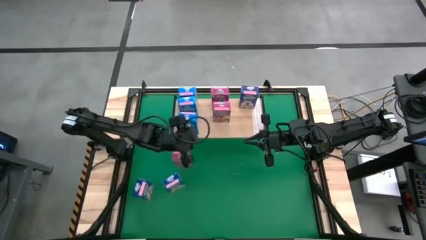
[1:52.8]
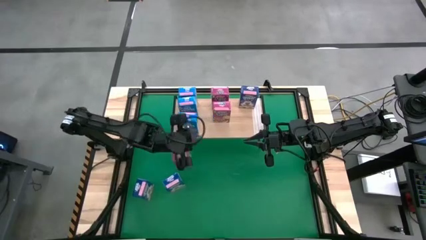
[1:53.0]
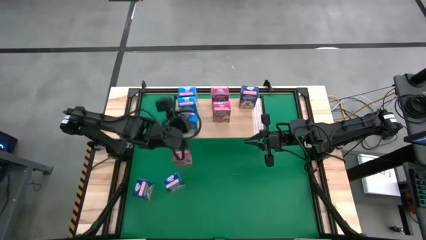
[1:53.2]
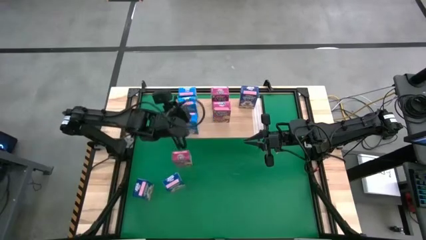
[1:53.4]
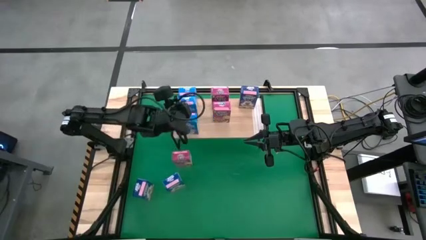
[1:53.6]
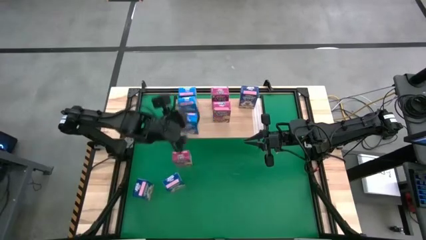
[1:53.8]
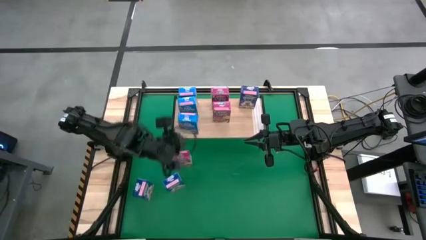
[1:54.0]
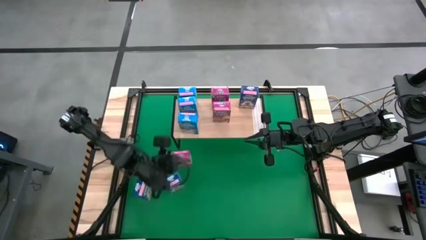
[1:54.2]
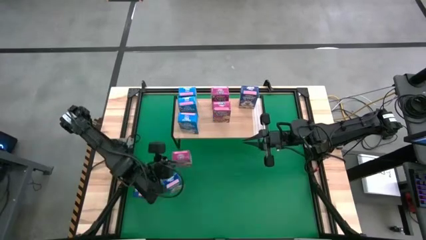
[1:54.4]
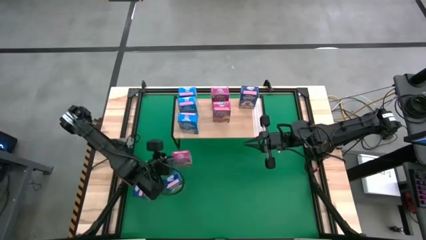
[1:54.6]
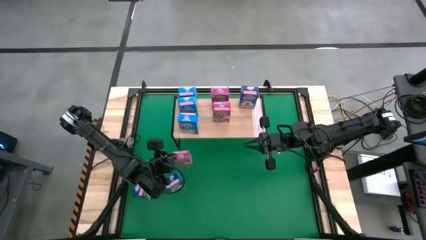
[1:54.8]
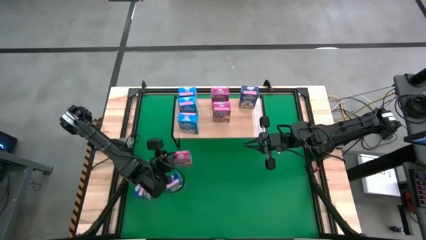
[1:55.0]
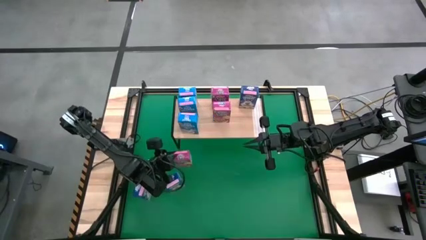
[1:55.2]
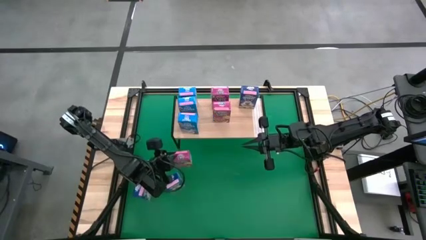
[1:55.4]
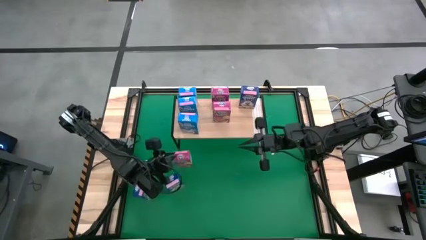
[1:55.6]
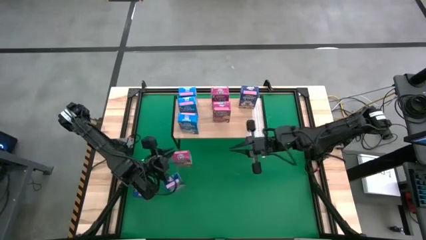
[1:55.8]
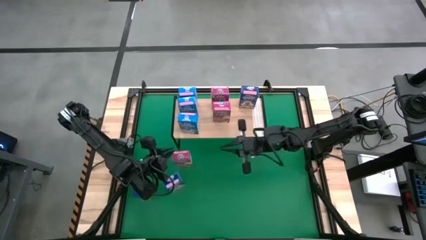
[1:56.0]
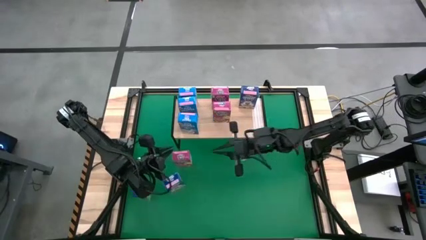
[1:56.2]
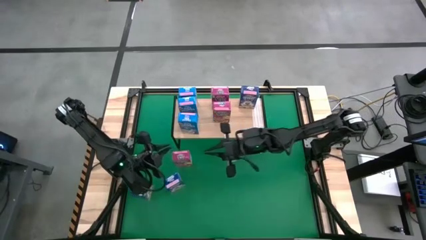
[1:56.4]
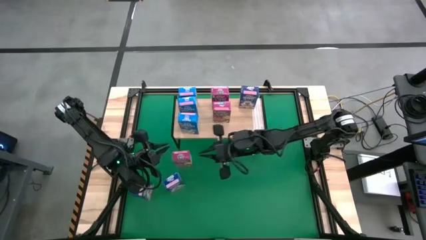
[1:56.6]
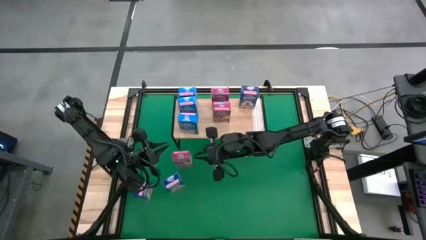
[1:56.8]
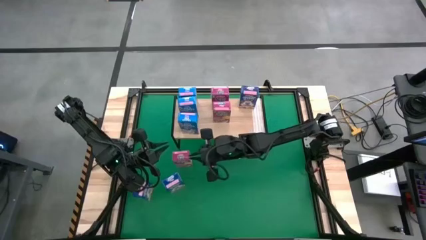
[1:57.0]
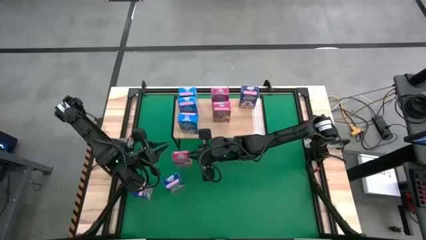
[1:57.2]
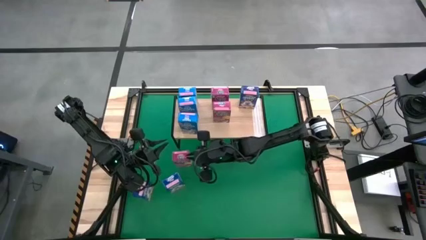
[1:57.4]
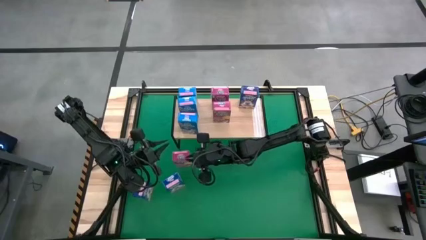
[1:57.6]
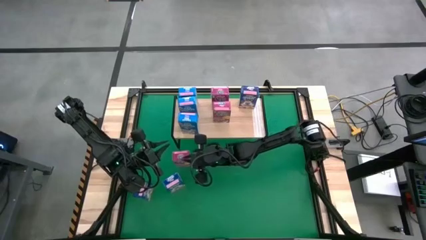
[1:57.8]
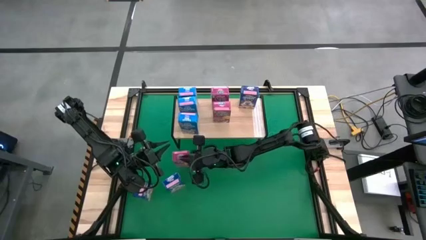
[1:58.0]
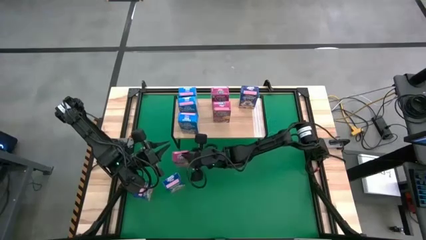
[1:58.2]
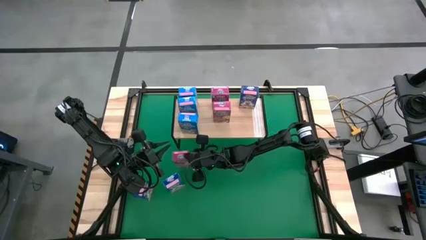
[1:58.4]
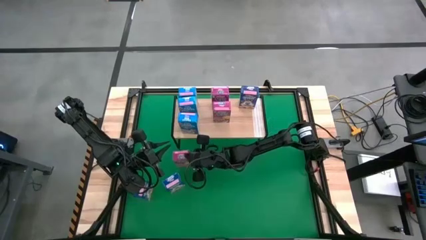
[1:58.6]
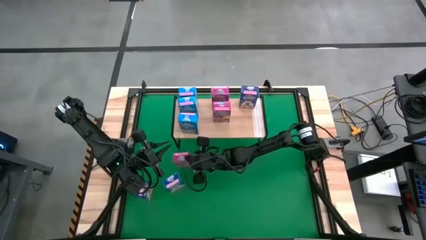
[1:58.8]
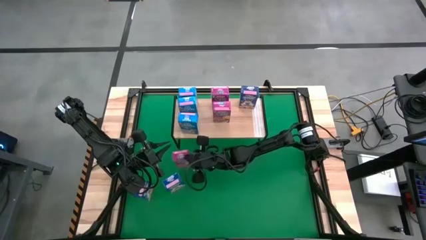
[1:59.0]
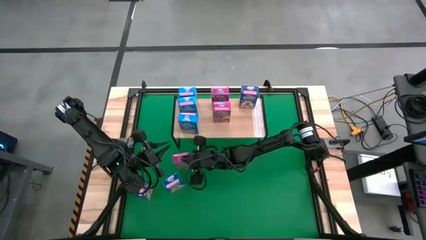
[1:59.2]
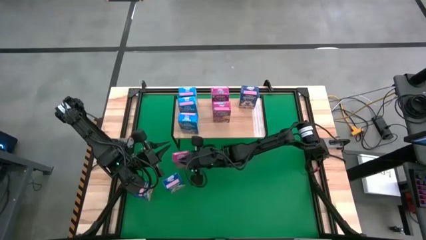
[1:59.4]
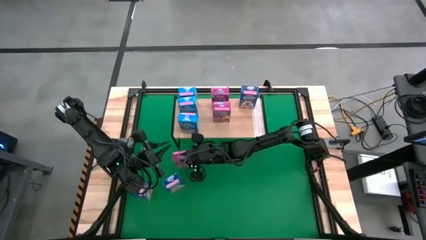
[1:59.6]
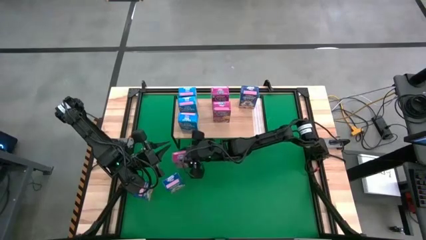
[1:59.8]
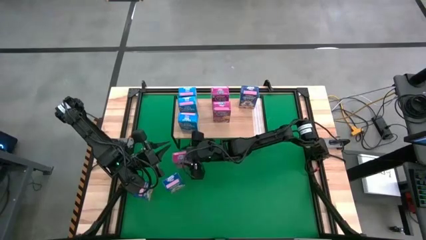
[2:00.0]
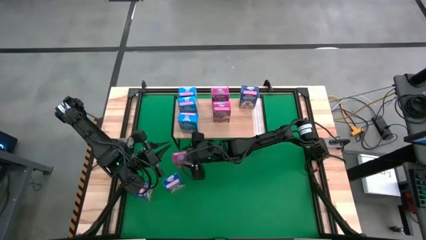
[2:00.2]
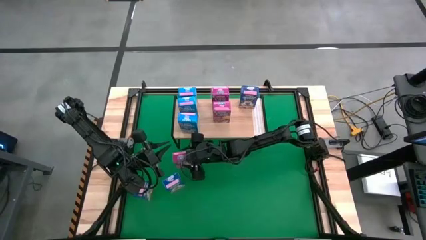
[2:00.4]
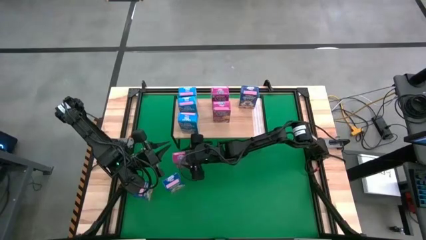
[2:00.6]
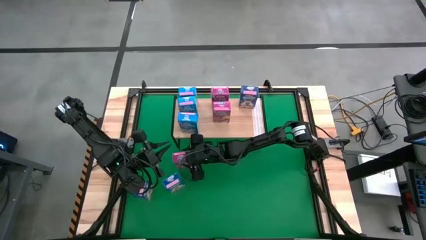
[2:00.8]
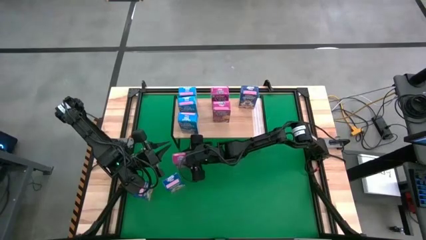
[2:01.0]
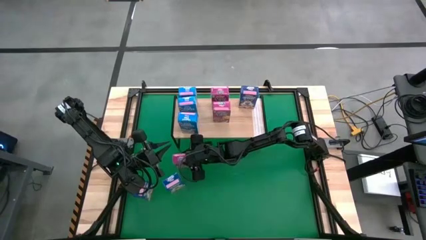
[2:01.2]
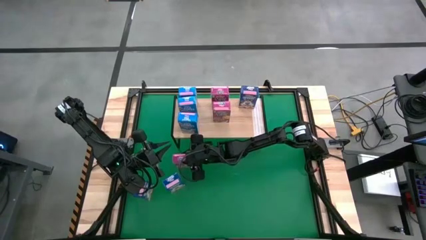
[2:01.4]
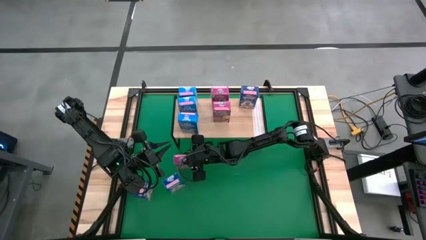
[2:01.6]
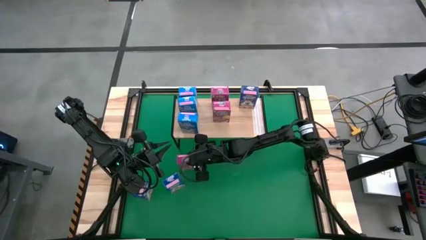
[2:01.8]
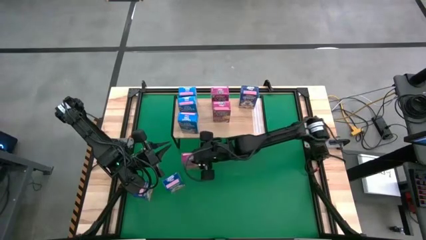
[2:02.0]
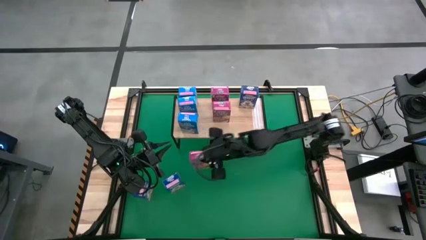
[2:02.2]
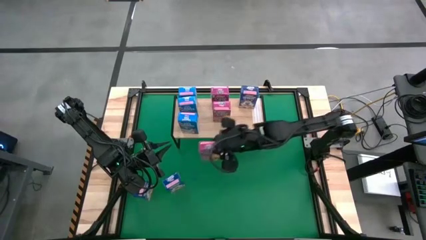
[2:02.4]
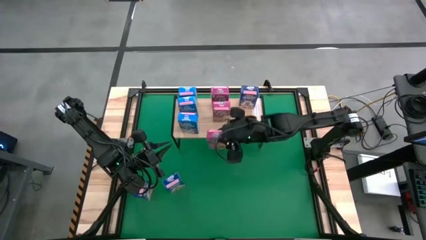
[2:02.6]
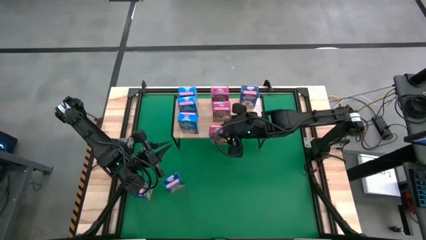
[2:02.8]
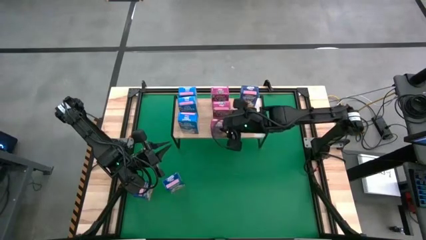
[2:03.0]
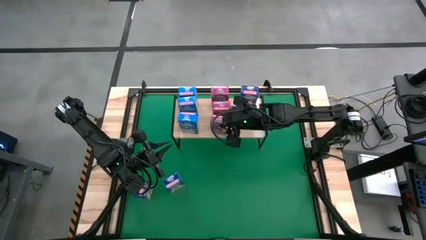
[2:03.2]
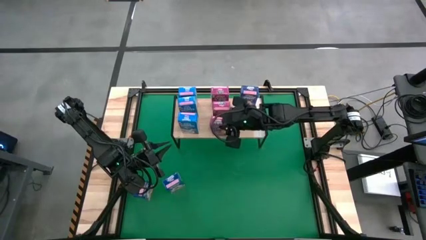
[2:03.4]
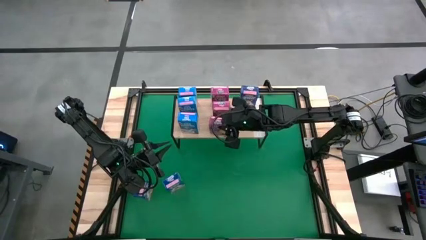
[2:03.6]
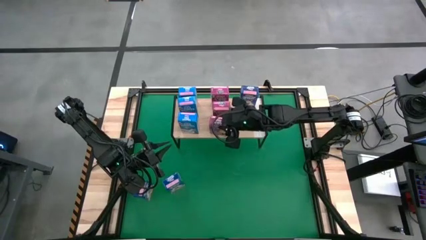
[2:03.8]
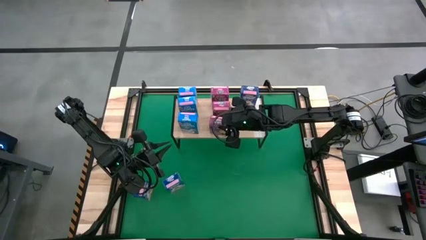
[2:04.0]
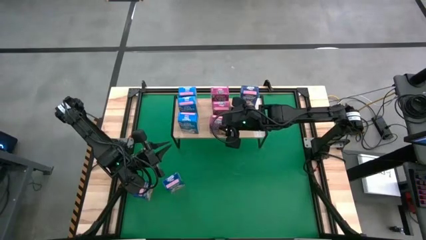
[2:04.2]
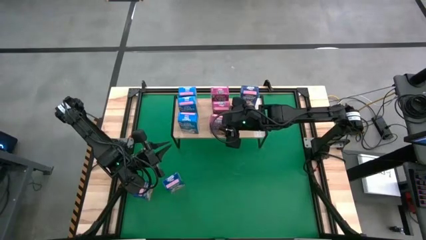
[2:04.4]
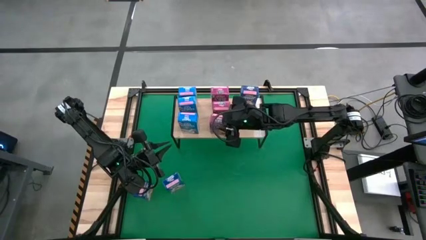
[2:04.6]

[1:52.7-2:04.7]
Task: Stack cereal on shelf
Put the violet cereal box, aligned with the other violet cereal box on the shelf

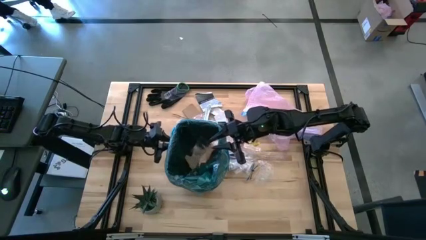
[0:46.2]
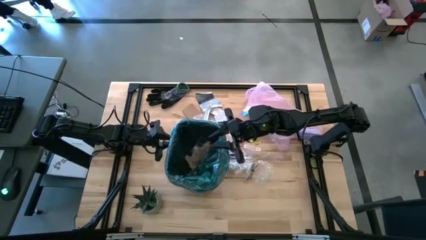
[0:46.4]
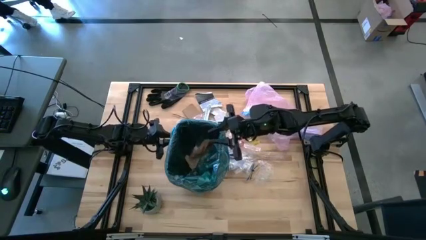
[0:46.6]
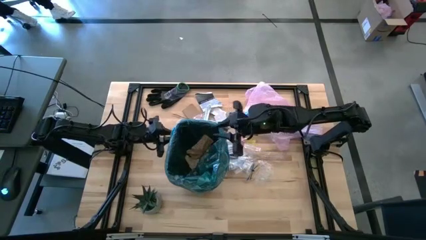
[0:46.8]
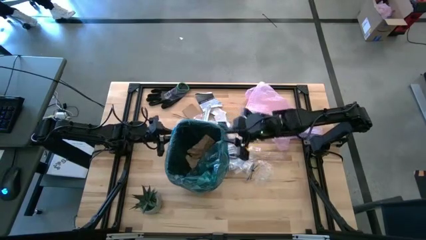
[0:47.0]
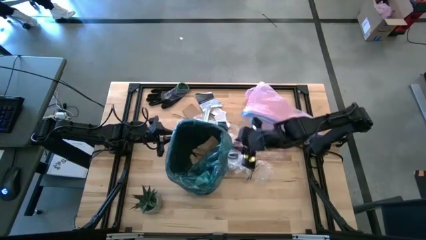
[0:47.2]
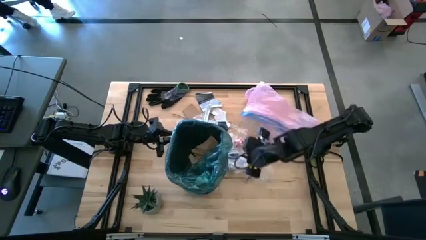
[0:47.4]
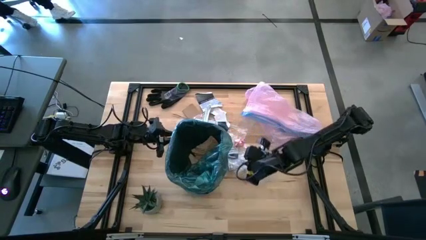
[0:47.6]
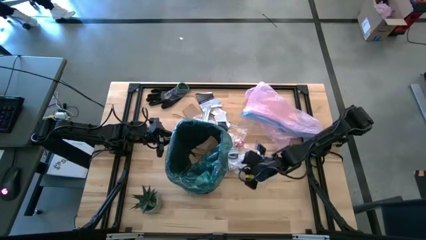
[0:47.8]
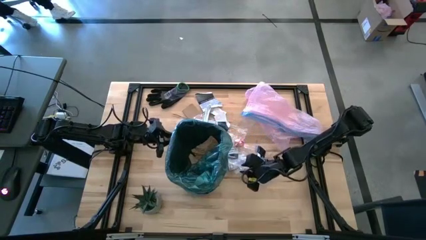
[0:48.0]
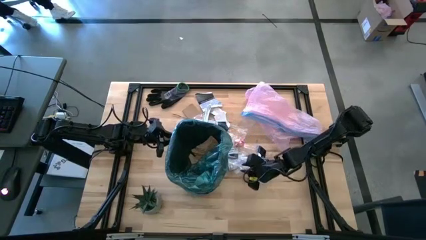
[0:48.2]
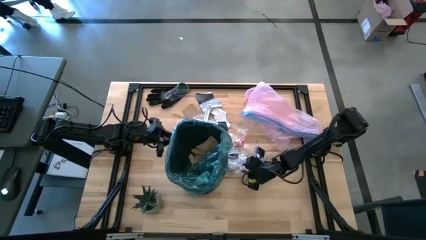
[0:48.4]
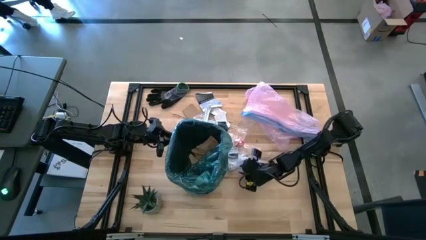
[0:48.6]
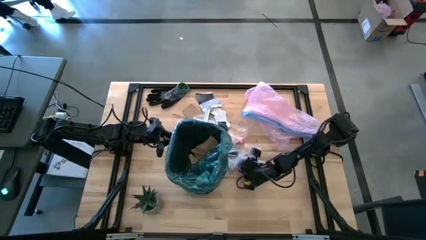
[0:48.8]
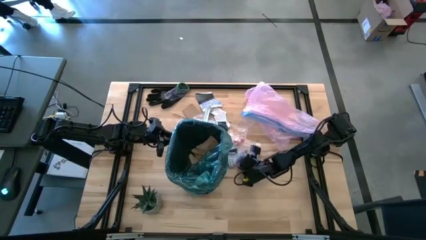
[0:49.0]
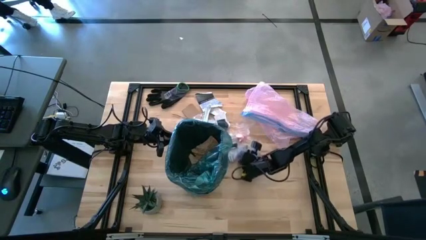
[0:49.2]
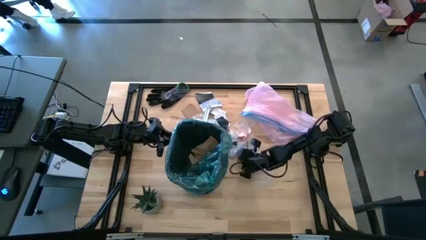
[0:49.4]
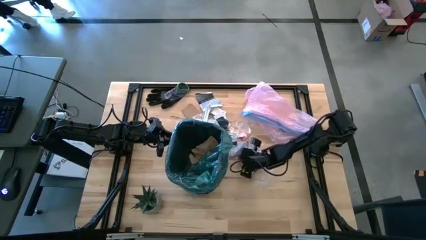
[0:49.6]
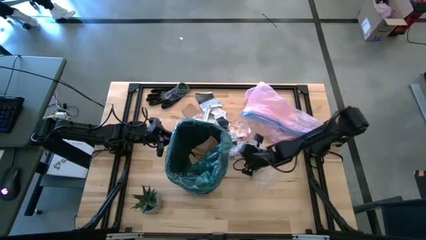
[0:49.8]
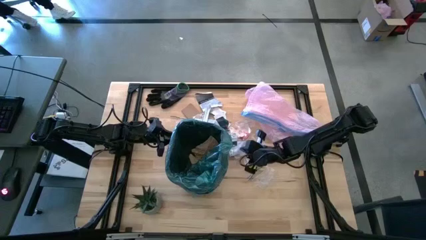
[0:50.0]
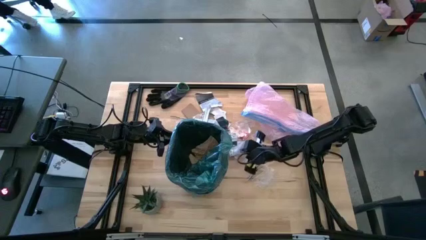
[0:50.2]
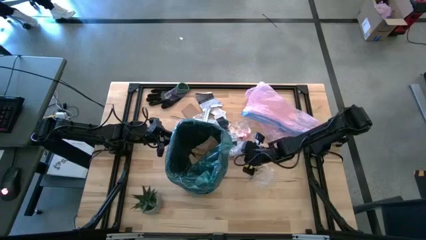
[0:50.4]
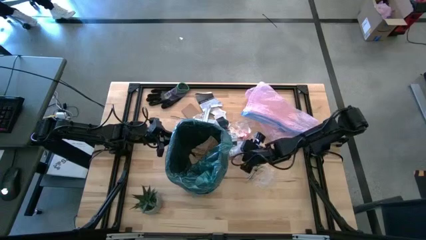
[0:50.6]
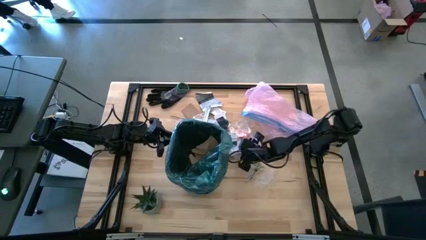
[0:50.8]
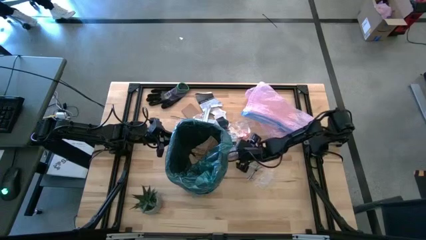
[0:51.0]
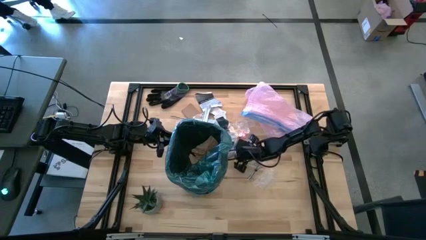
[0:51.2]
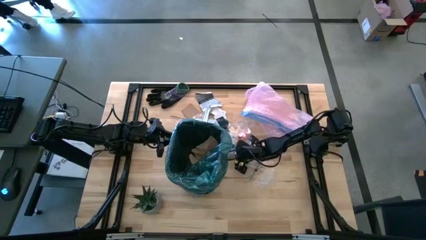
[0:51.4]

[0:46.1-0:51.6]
Task: place trash/remove bag and relplace
Put the clear plastic into the trash bin
